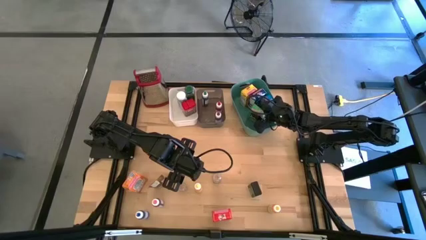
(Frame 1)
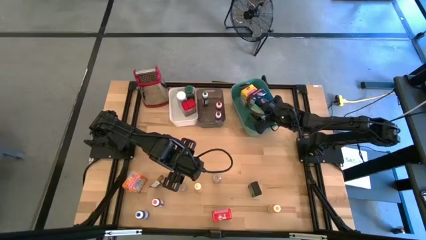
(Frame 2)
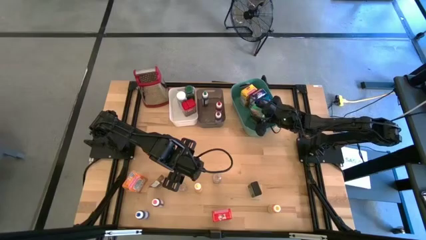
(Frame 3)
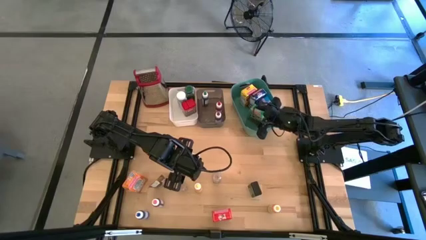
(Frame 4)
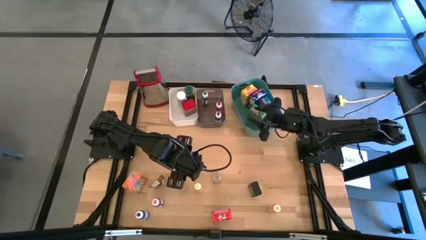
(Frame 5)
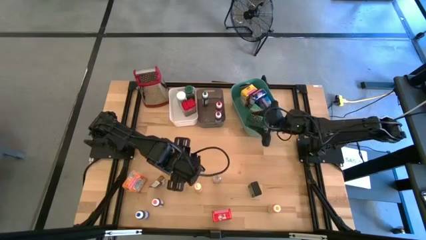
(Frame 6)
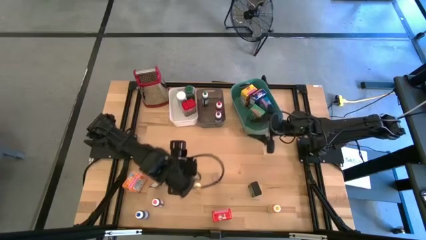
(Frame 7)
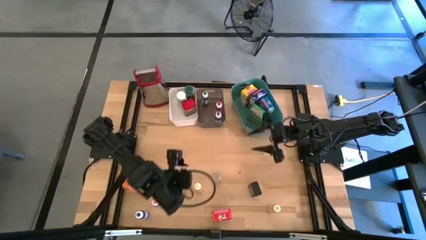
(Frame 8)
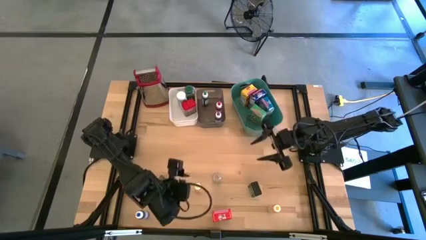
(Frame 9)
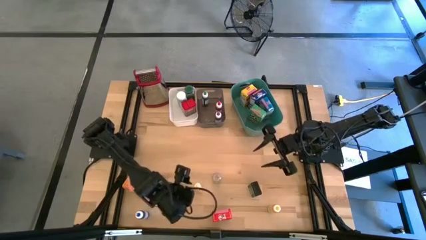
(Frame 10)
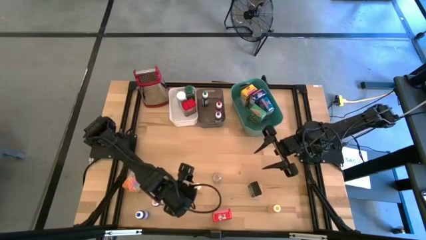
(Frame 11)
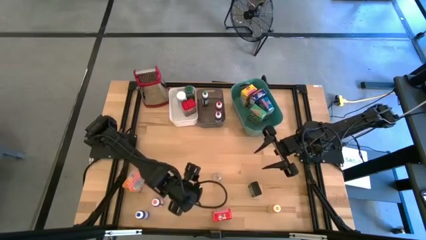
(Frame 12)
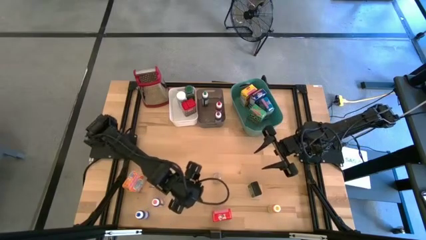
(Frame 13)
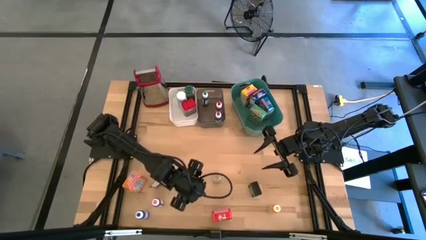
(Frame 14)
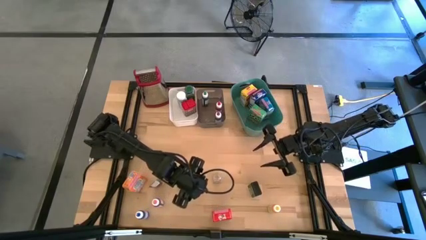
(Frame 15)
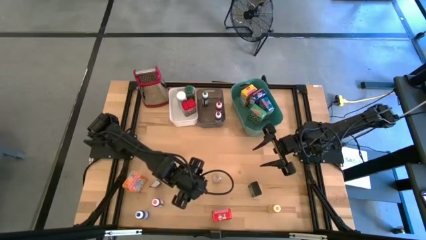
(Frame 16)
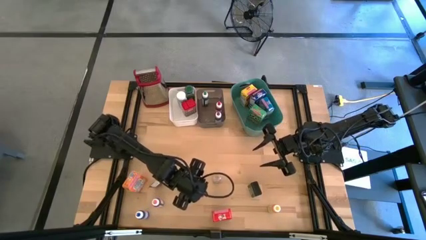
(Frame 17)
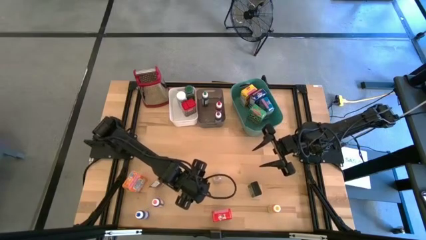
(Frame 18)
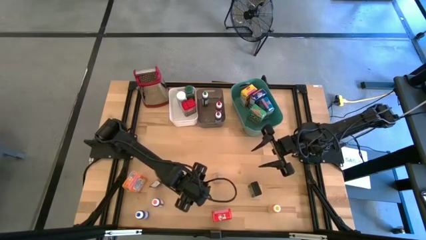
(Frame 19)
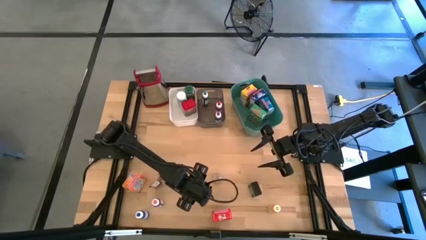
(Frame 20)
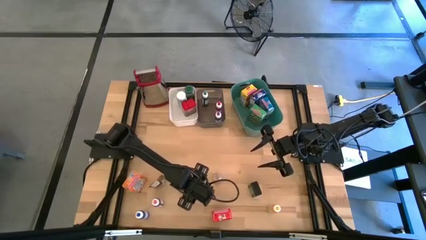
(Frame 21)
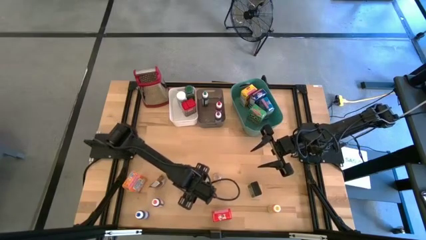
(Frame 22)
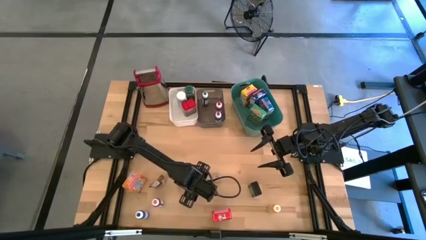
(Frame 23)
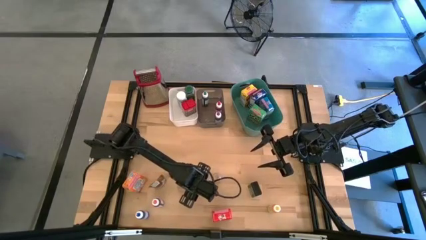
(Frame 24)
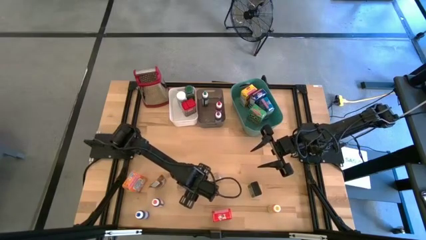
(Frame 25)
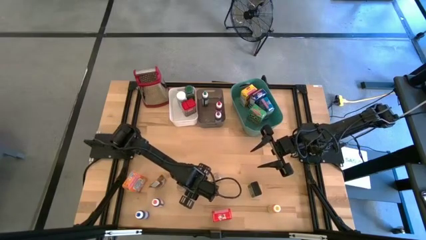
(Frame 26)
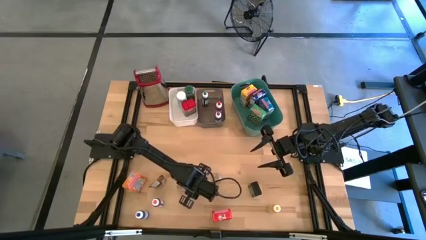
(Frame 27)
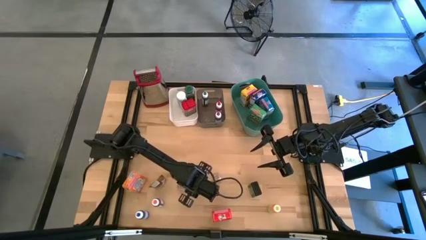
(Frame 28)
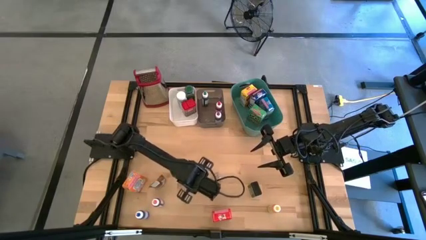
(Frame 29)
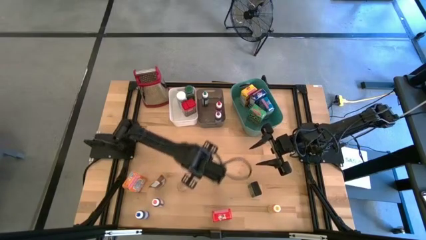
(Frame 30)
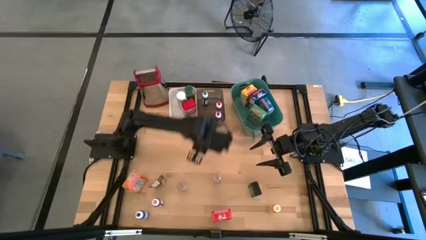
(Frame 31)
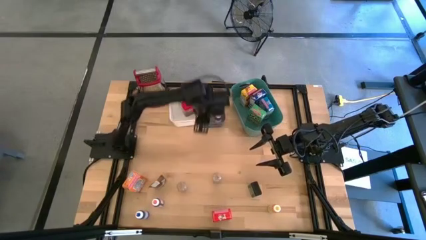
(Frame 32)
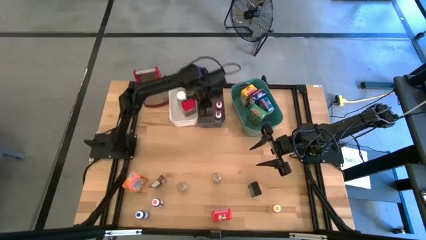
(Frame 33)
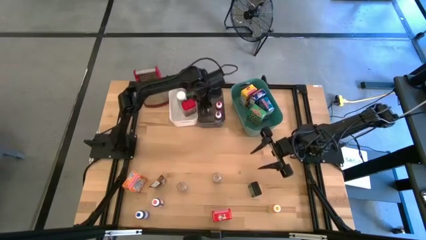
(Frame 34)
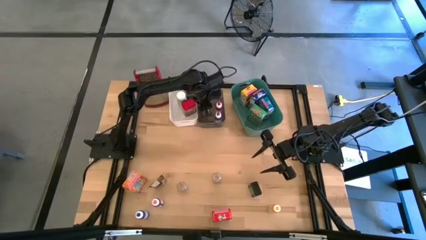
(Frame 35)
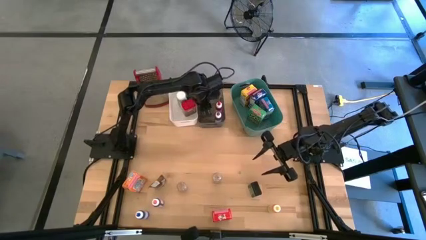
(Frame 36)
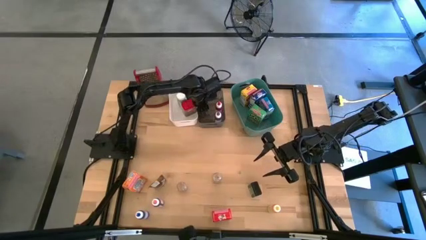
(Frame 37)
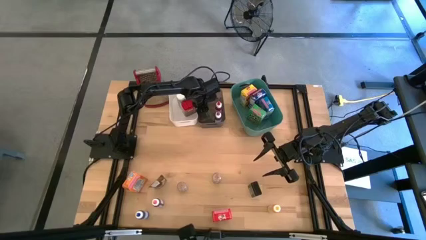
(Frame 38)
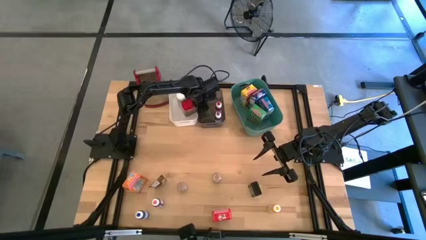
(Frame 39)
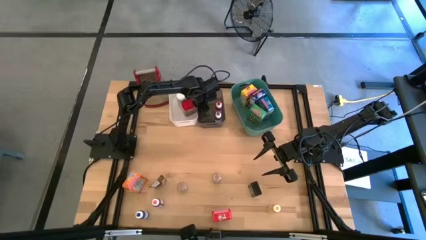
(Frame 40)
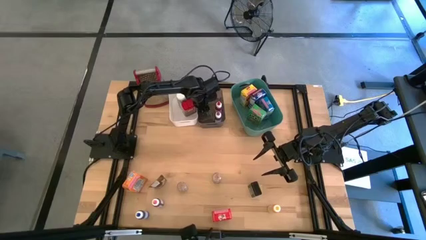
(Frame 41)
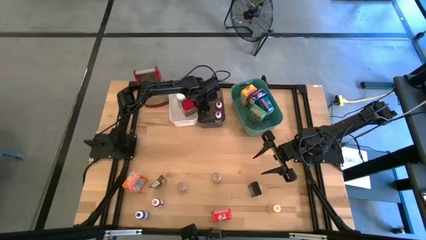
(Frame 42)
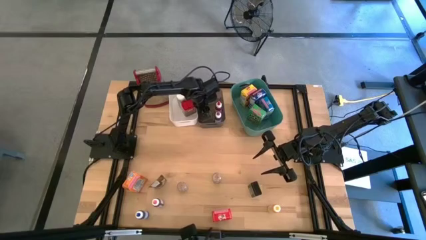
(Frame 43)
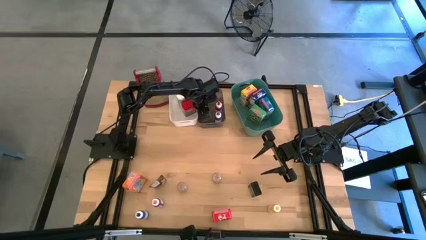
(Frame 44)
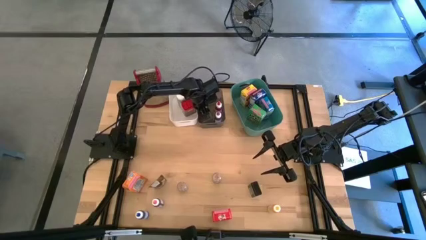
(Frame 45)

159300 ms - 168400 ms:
Task: Pick & Place Kitchen Items
Put the left yellow food coloring bottle into the middle black transparent bin

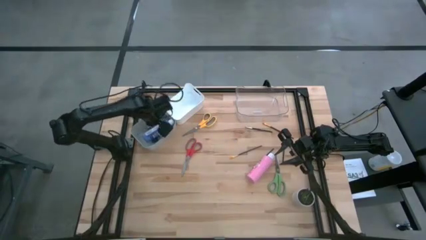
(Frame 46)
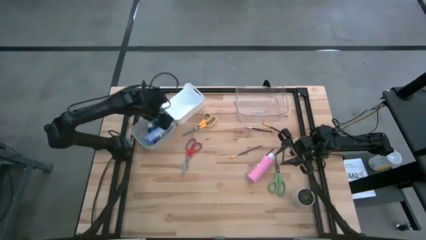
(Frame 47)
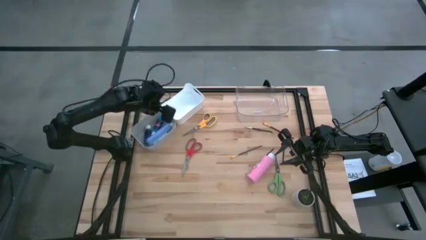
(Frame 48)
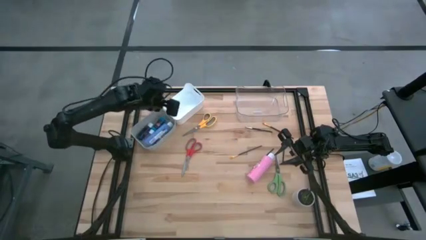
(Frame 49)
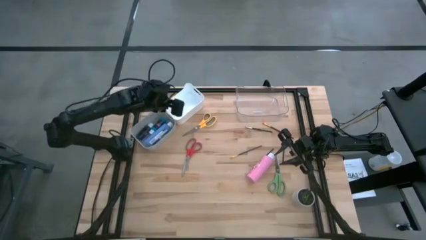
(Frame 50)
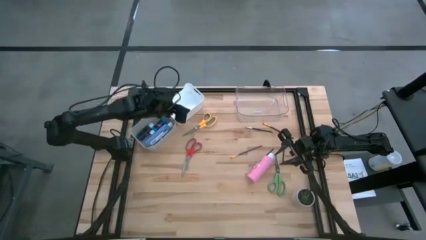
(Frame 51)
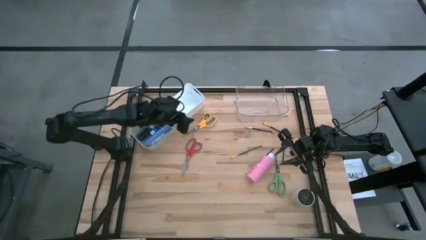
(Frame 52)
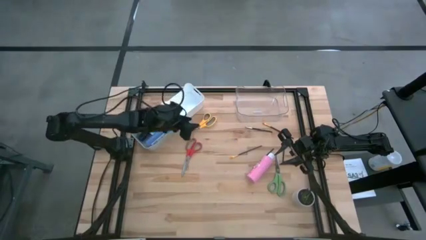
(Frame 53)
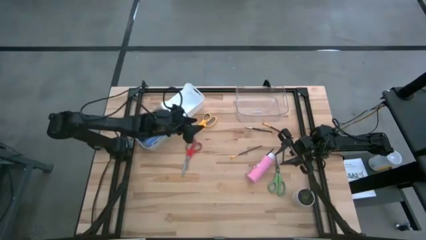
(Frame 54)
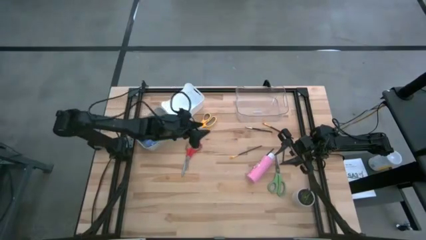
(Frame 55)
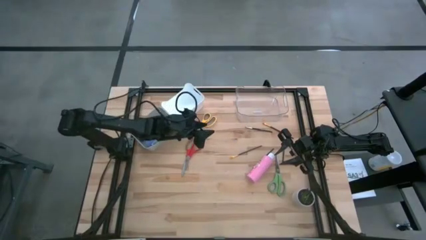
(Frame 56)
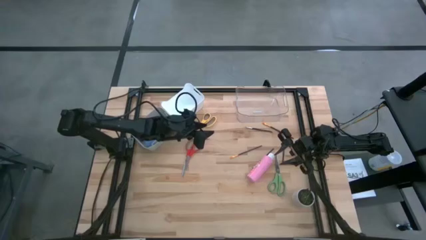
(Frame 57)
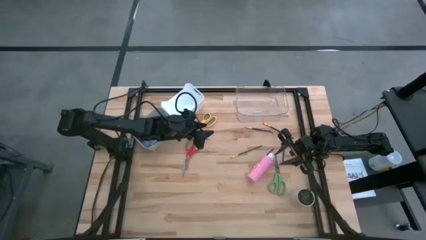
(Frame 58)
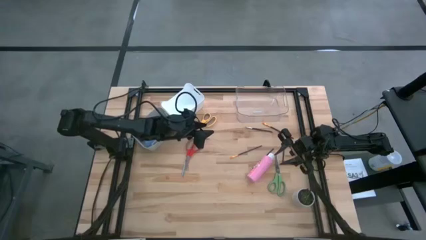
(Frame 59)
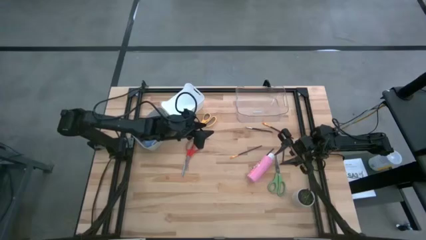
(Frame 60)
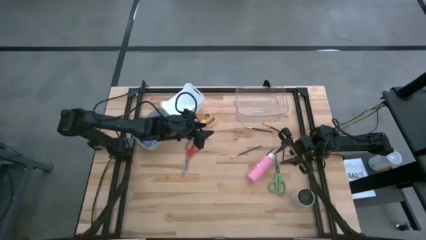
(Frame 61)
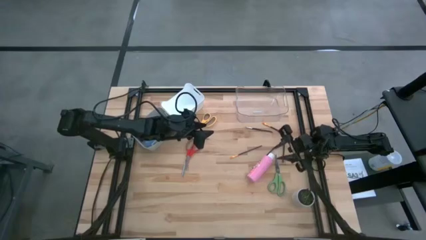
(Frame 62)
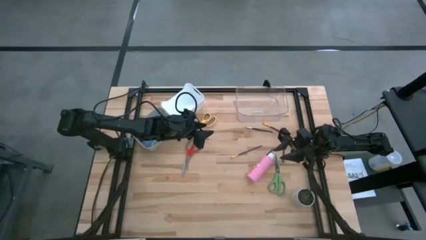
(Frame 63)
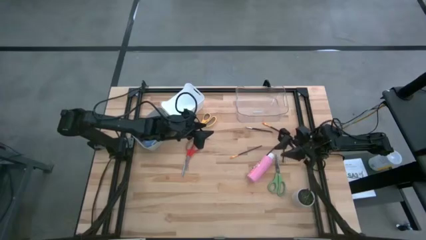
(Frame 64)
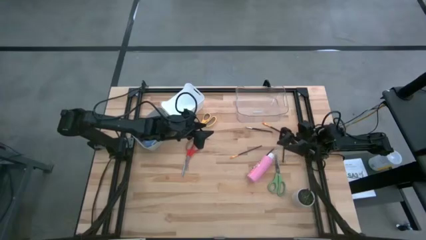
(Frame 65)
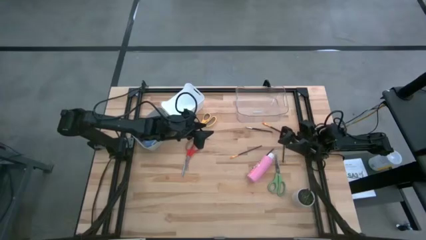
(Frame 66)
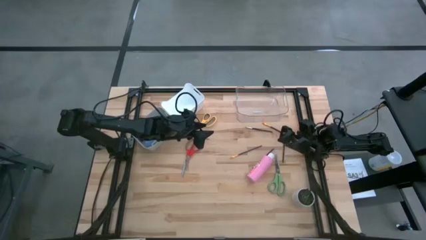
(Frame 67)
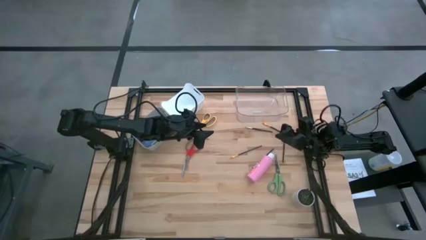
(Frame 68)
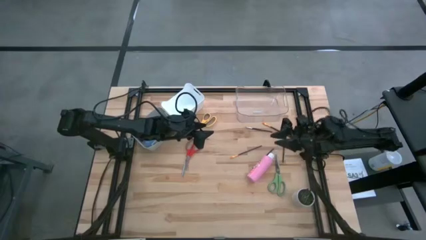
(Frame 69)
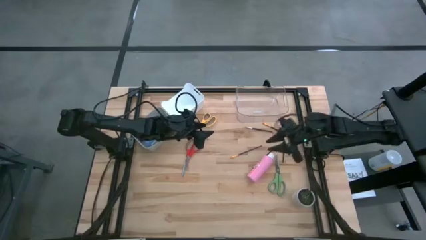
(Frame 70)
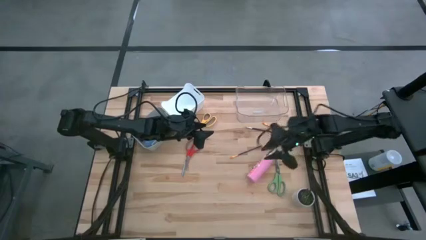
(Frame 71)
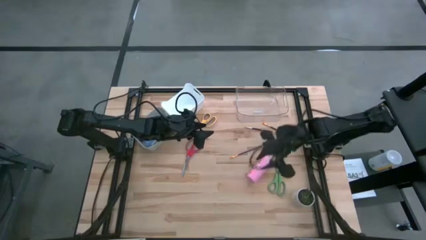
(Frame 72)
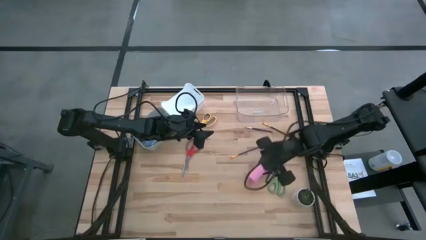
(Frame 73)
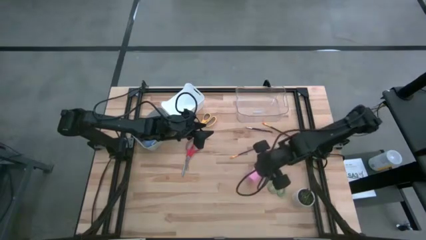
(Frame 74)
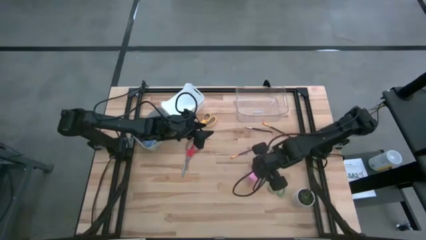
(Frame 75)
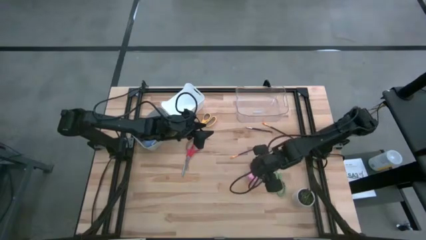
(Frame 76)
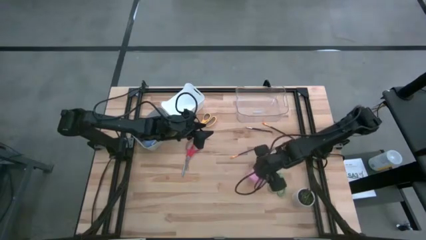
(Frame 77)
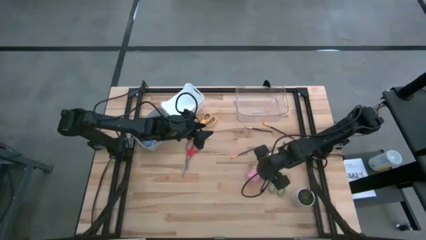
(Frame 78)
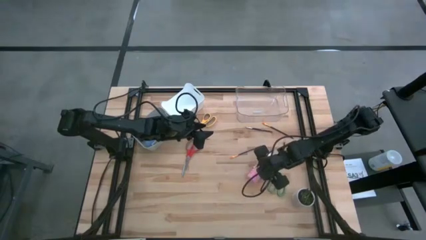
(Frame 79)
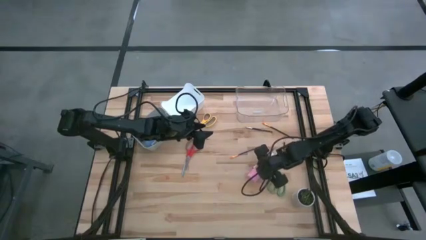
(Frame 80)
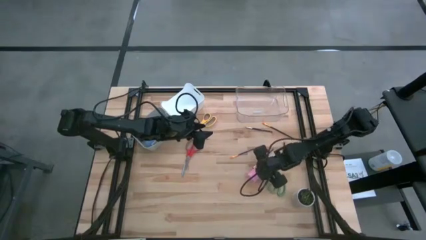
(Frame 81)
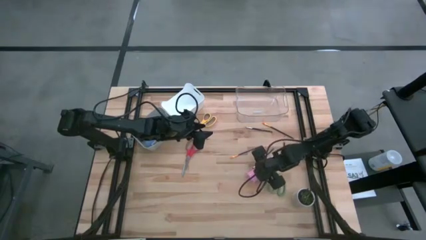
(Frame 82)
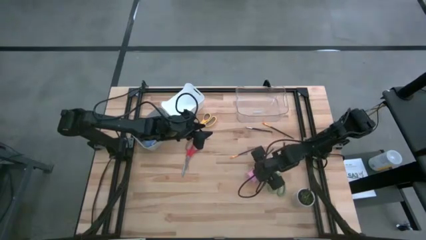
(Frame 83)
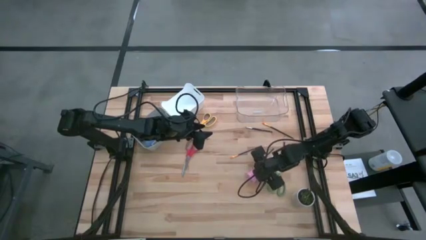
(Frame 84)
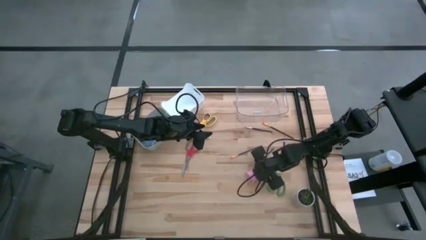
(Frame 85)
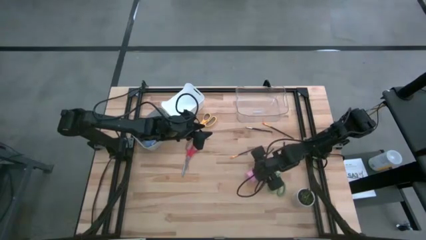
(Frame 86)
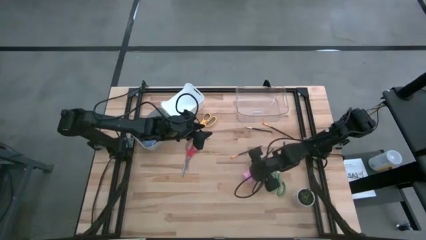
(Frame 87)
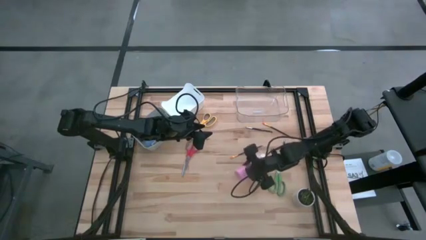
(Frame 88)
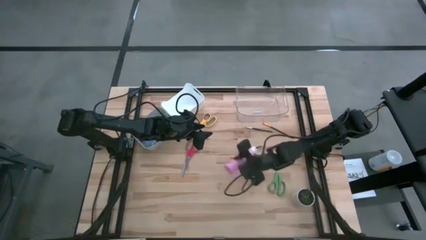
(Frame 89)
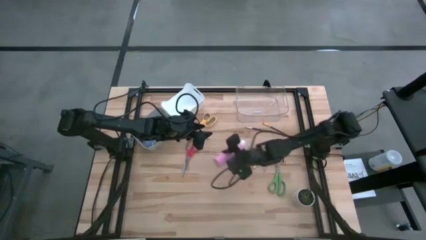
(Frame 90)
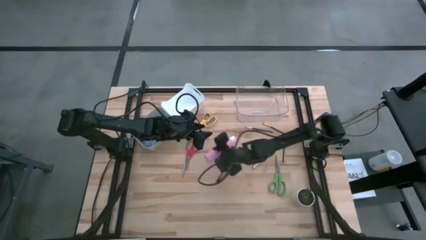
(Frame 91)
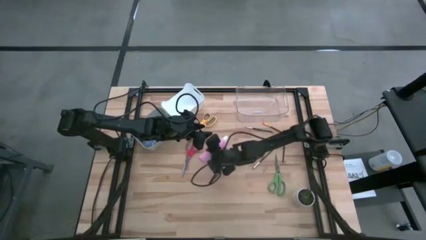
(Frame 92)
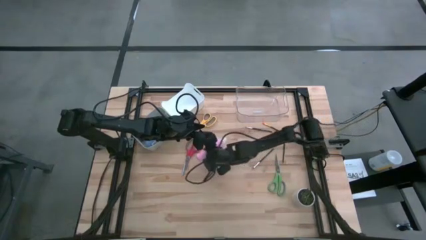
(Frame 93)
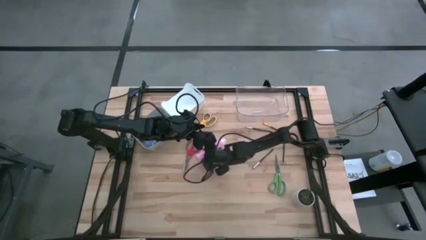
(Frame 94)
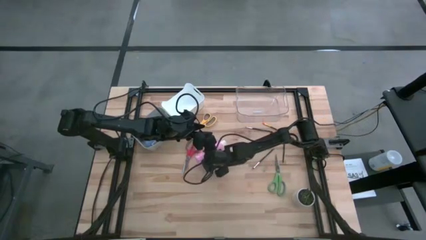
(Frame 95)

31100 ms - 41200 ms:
Task: Pick & Place Paint Supplies
Put the pink paint bottle into the gray bin
